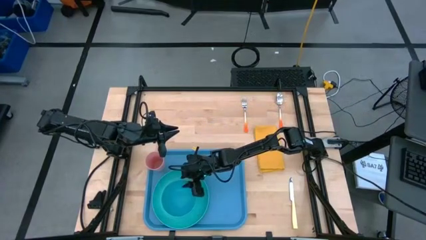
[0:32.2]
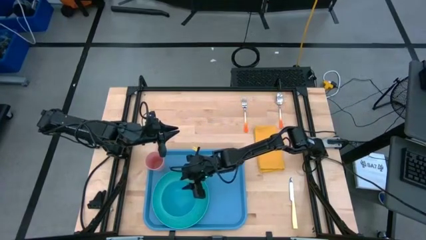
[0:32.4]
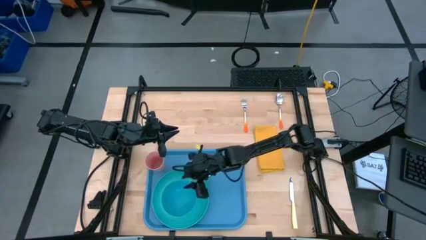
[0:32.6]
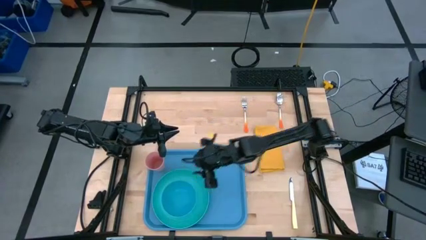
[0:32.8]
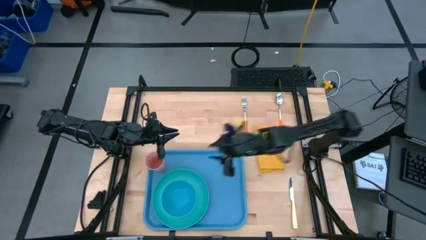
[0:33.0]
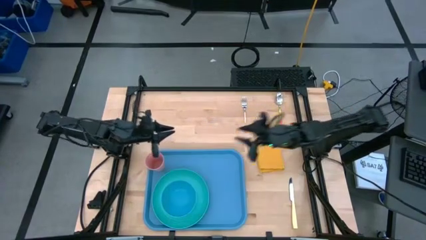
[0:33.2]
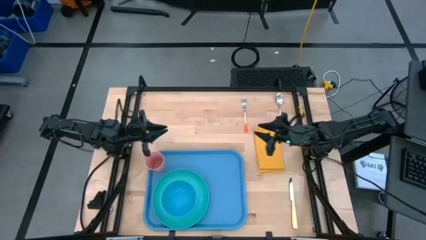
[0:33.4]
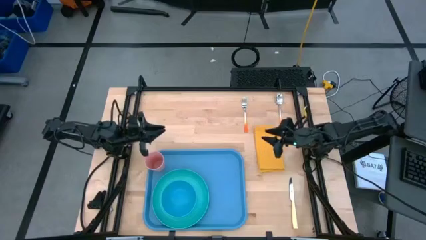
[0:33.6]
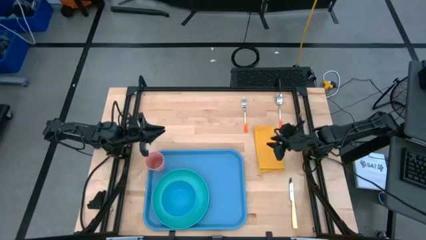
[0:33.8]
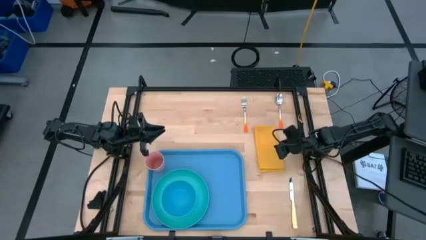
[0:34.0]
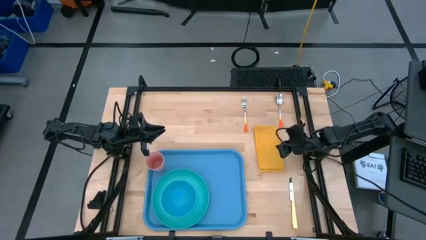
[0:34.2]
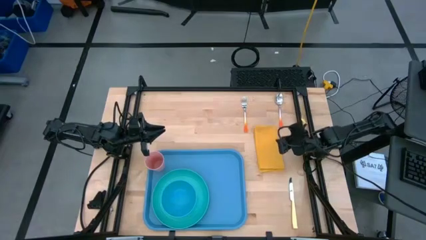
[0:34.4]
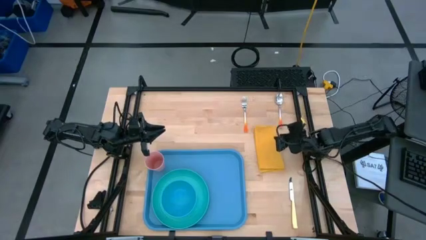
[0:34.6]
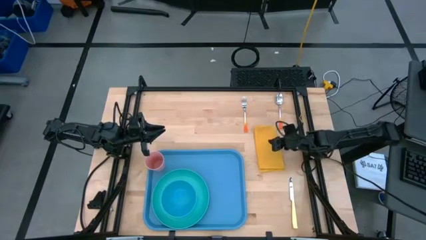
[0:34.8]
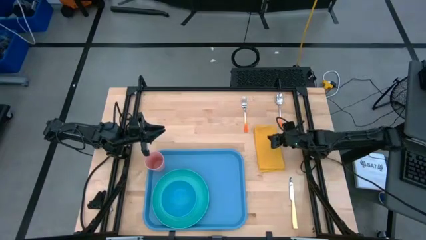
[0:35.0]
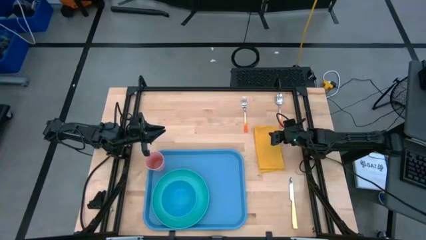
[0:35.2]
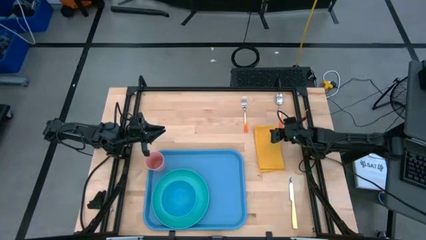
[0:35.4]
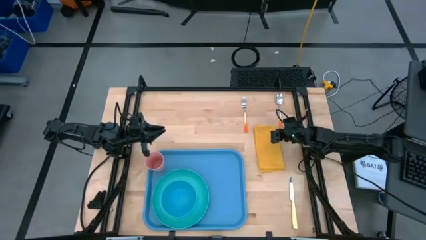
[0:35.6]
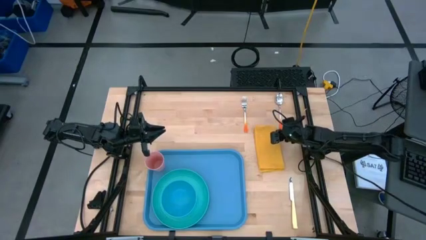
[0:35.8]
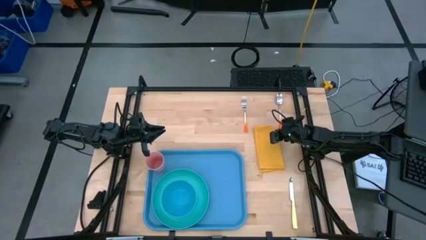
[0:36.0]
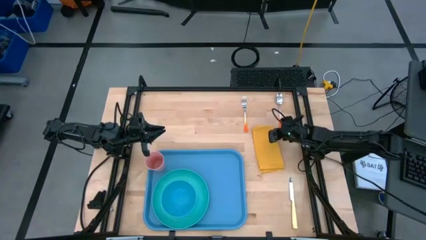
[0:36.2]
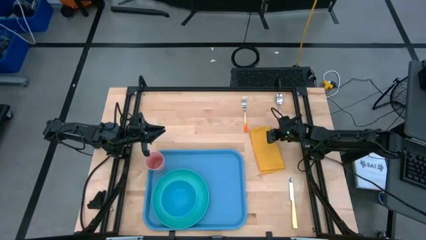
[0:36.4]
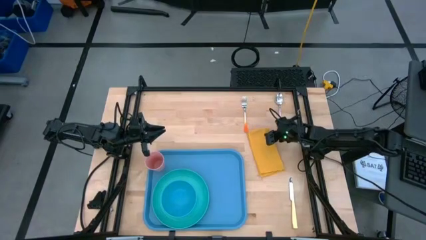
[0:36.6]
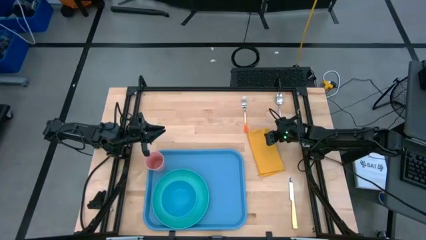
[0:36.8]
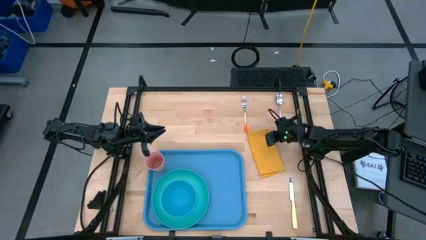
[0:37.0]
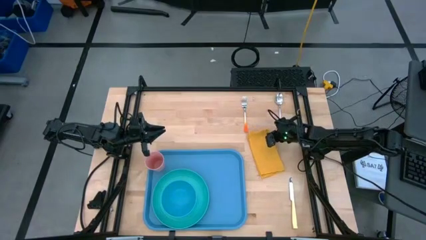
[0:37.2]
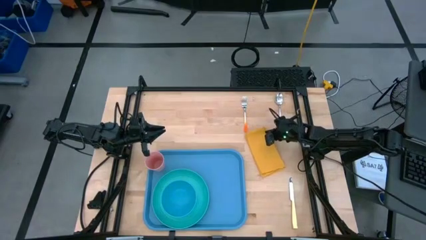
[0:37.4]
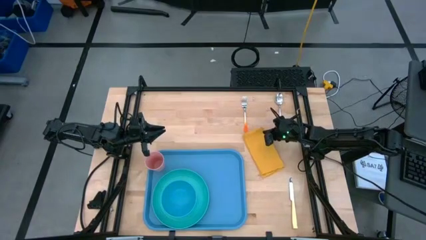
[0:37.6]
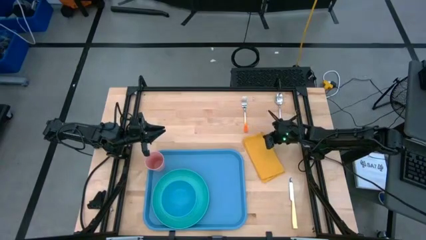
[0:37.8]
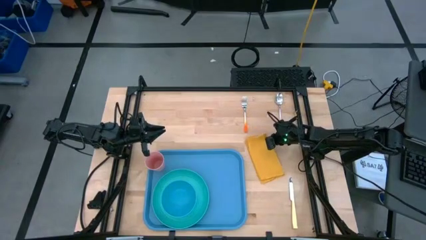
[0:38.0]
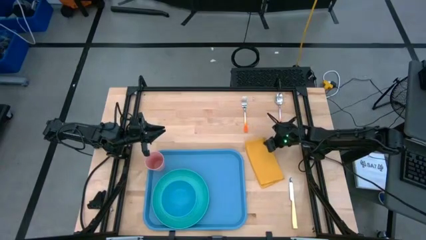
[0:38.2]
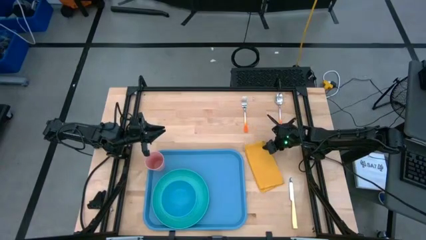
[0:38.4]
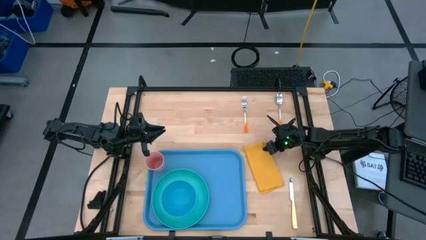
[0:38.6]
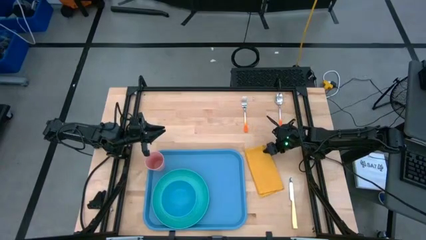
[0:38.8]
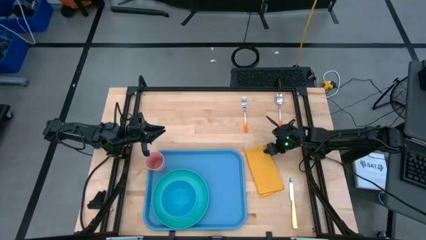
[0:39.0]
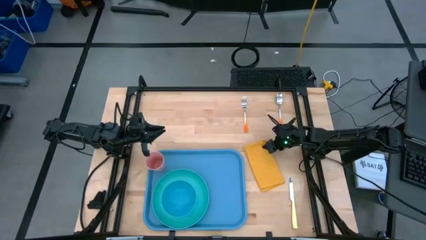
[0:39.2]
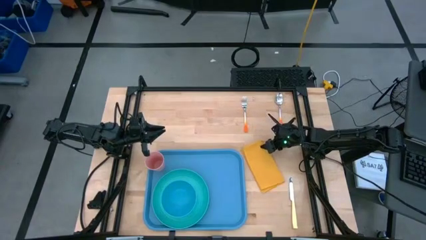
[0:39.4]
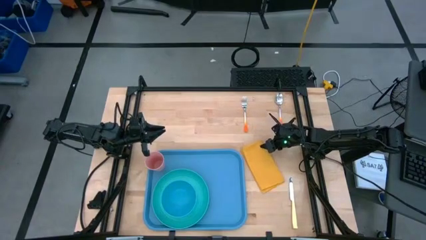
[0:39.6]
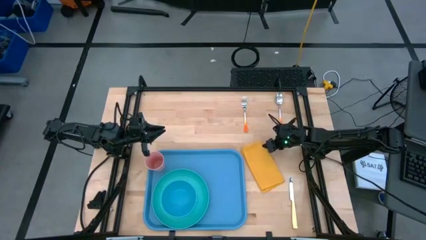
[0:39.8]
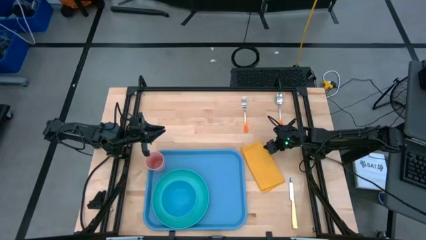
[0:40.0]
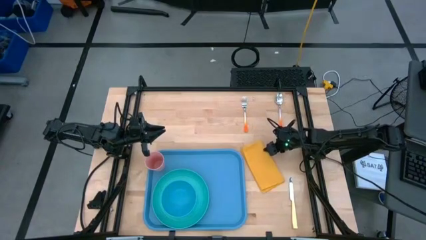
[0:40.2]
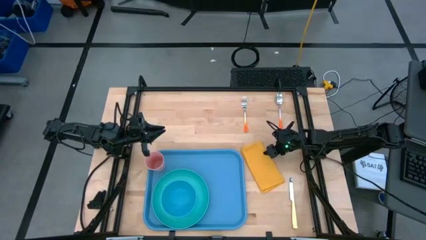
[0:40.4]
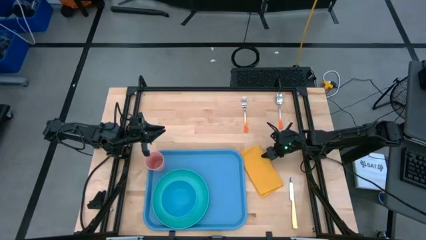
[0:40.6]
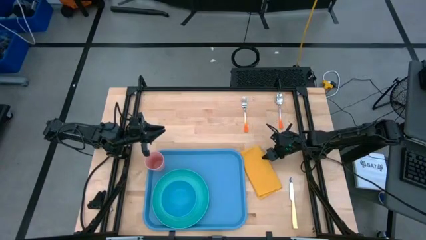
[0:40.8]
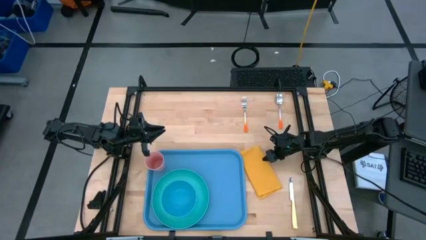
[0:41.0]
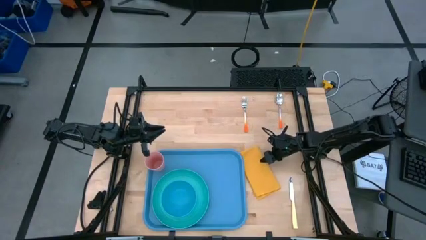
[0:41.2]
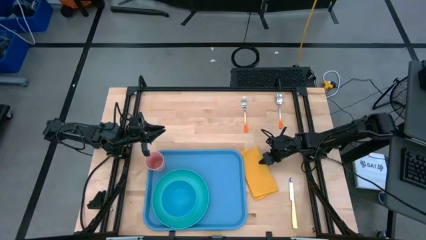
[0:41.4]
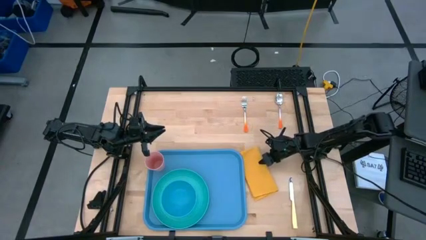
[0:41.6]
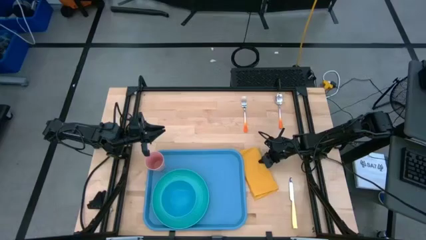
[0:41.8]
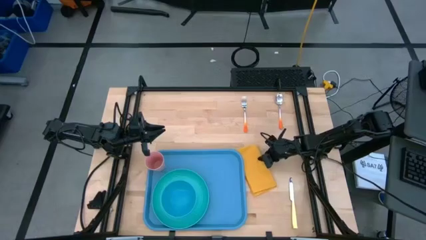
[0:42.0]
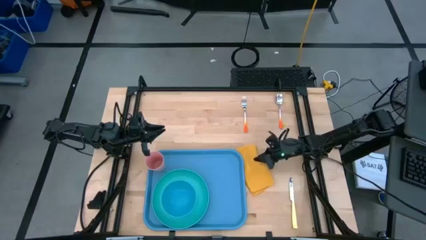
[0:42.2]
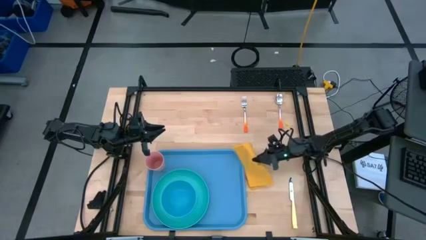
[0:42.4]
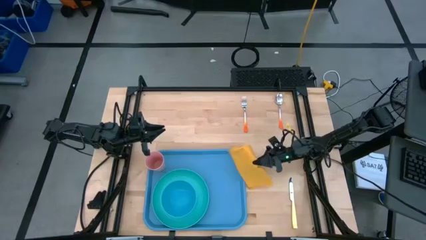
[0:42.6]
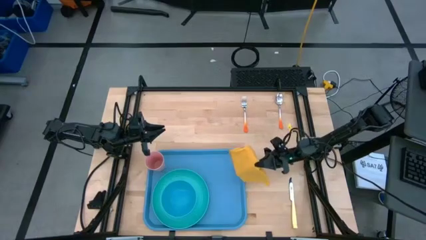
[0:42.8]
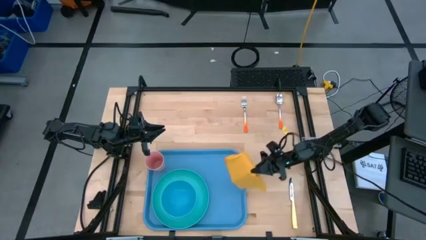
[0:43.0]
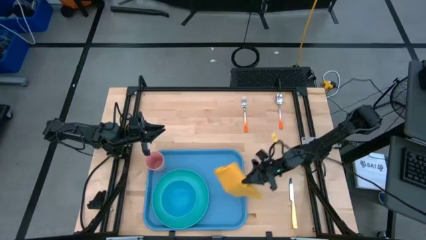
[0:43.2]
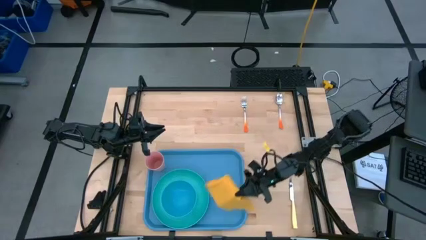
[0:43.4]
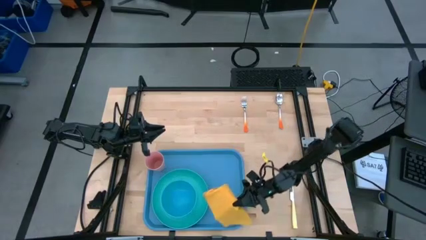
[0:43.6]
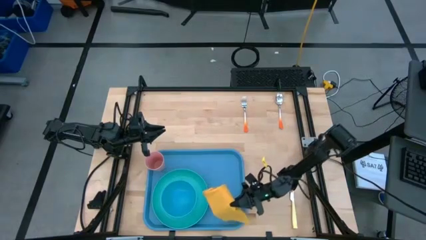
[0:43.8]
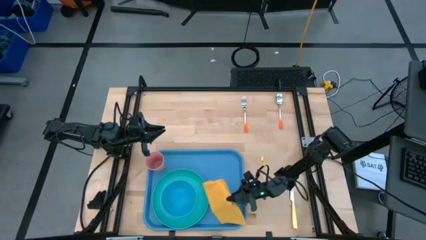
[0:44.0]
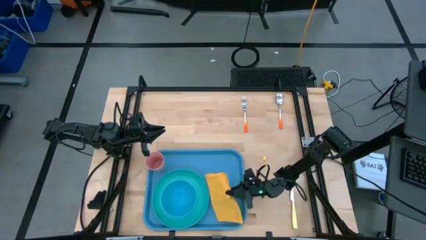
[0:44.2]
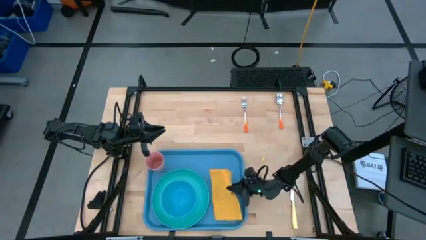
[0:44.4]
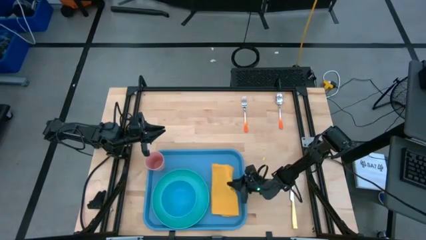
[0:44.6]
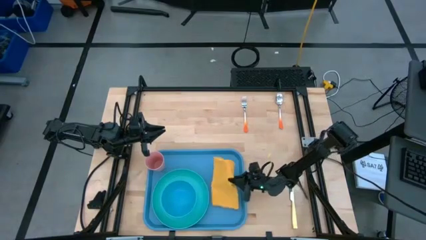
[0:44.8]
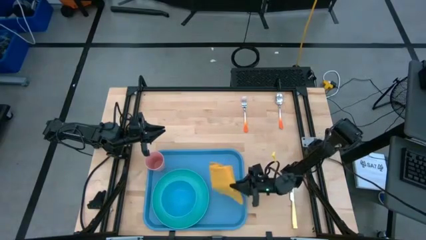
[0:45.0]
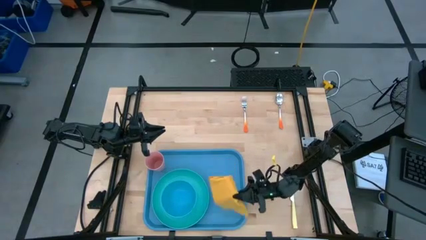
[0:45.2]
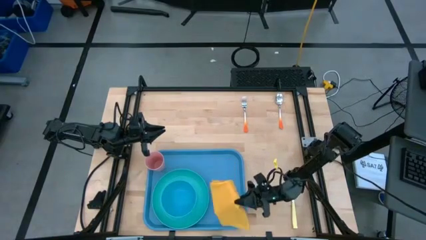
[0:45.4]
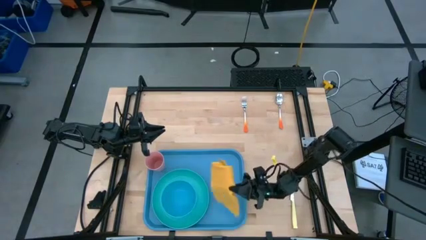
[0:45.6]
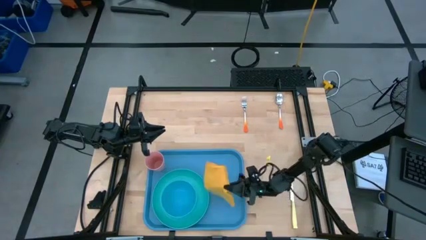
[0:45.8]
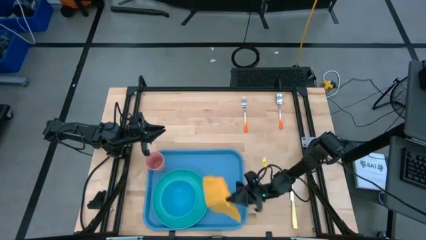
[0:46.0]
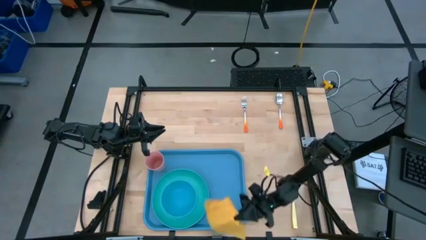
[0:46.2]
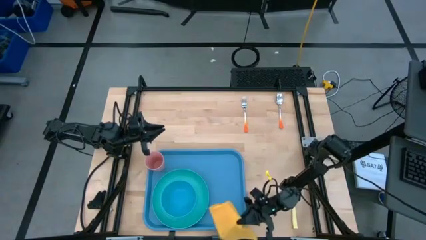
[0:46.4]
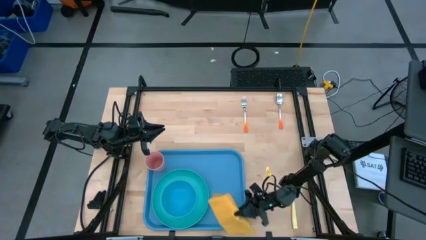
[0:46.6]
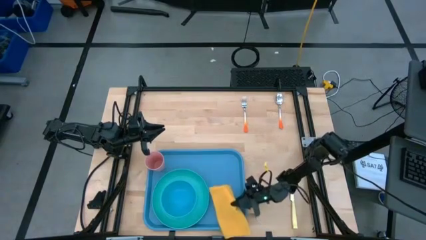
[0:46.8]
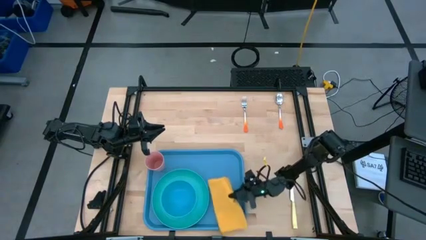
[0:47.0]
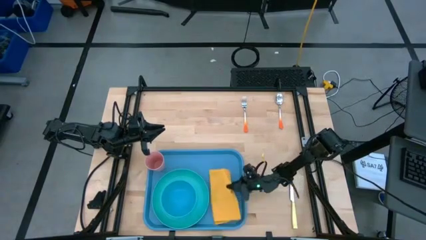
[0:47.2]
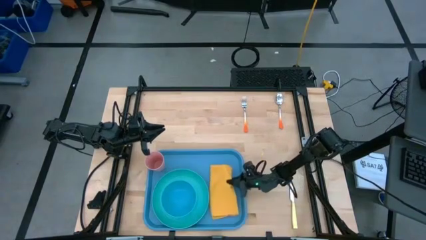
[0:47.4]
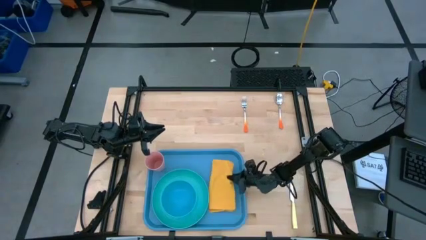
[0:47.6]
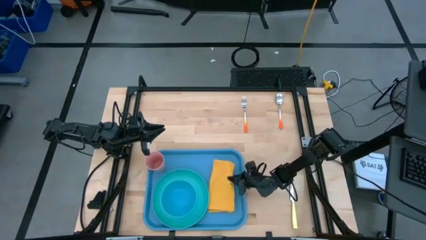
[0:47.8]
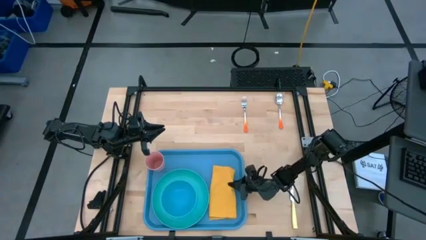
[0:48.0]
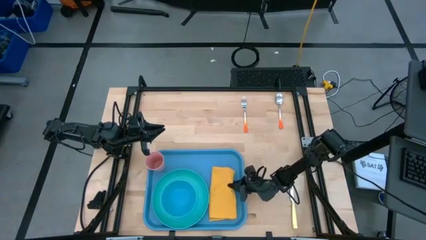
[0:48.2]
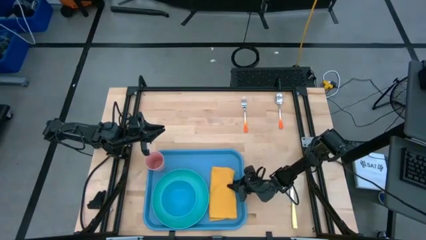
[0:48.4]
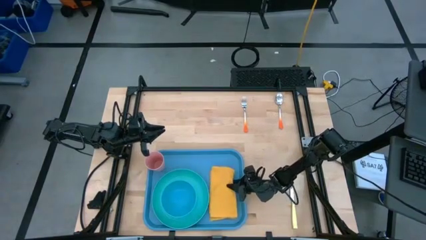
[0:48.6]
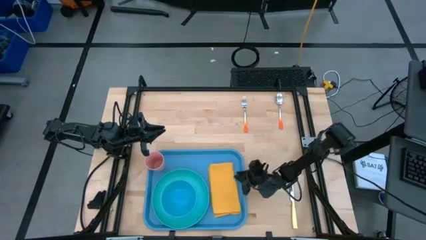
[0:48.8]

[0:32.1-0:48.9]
Task: Set up tray
Put the yellow napkin on the blue tray
